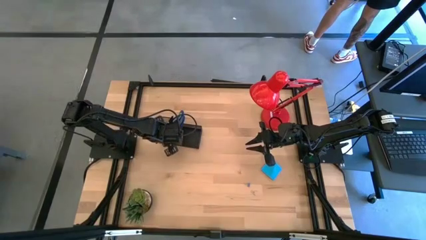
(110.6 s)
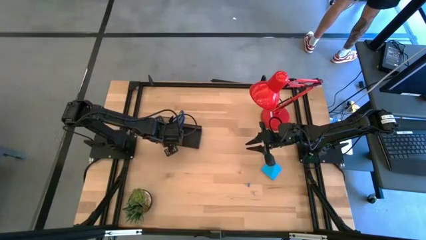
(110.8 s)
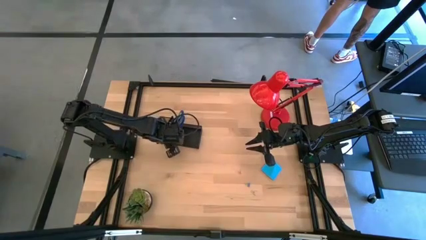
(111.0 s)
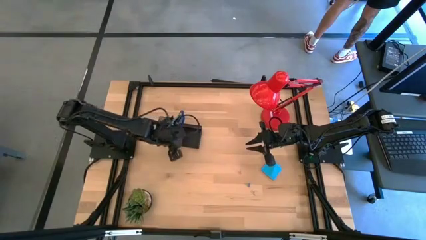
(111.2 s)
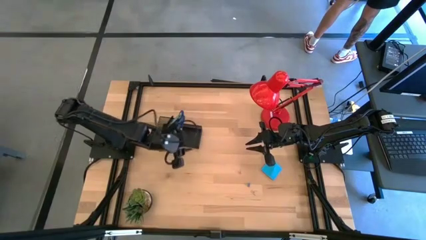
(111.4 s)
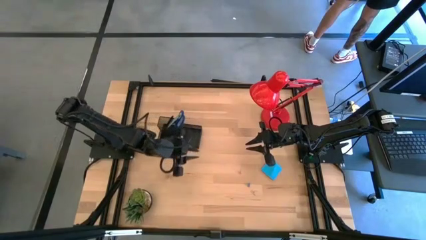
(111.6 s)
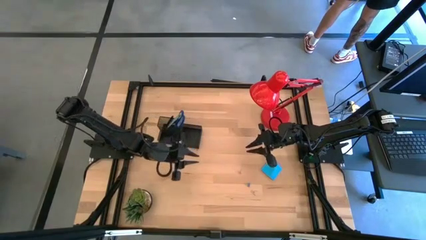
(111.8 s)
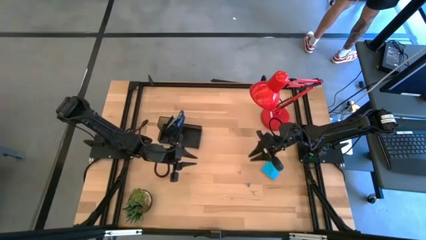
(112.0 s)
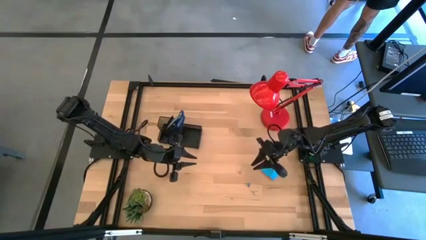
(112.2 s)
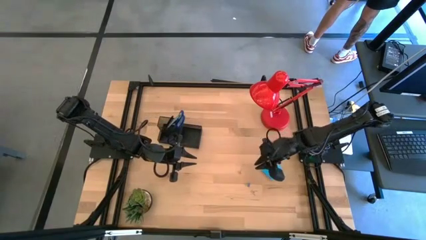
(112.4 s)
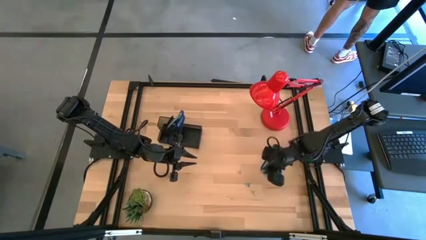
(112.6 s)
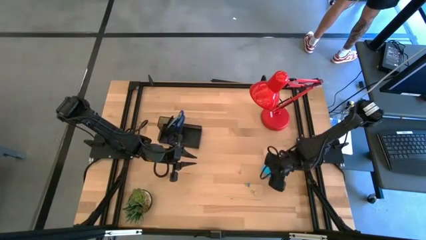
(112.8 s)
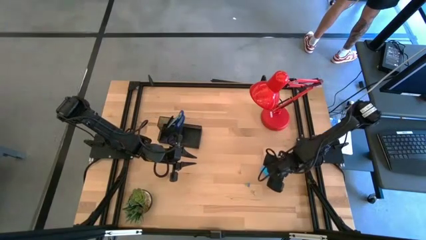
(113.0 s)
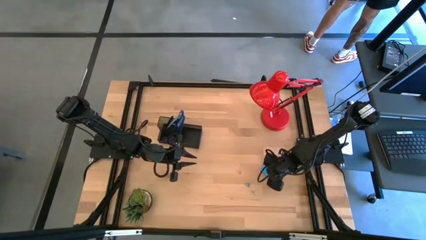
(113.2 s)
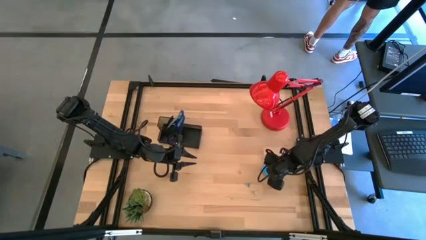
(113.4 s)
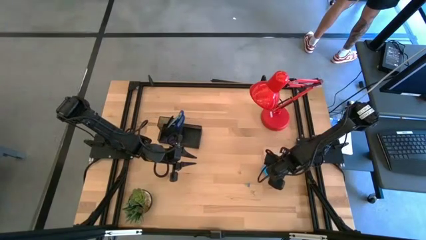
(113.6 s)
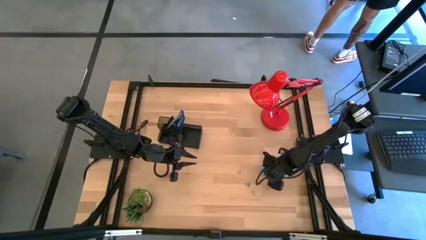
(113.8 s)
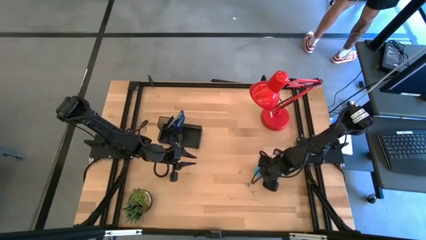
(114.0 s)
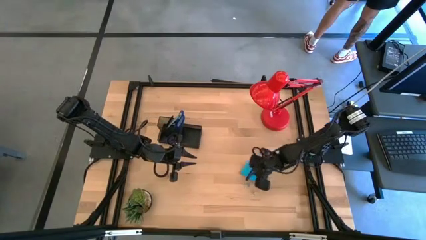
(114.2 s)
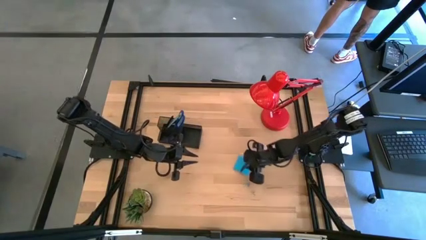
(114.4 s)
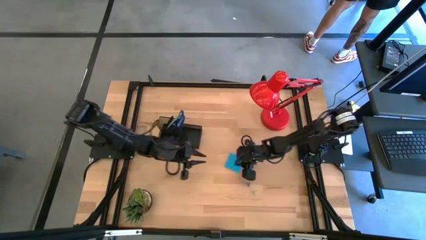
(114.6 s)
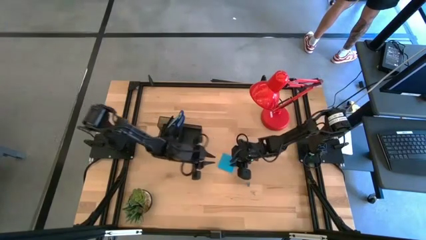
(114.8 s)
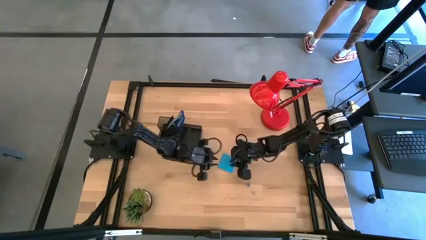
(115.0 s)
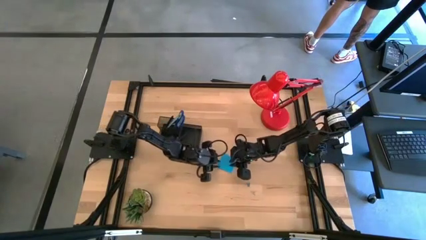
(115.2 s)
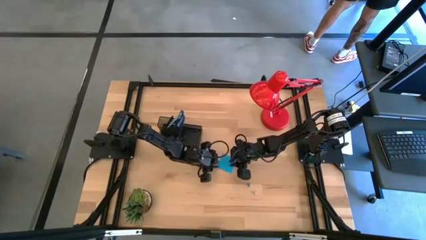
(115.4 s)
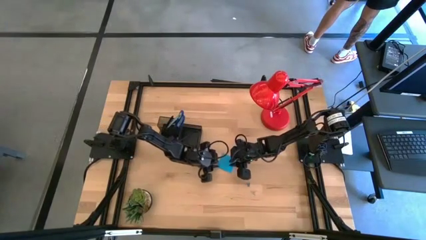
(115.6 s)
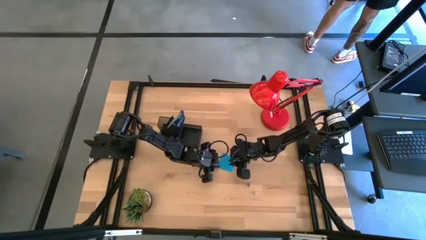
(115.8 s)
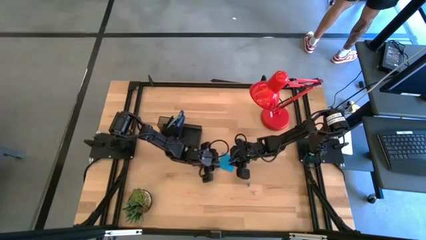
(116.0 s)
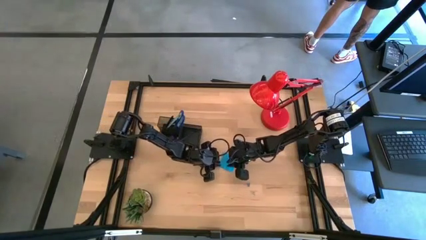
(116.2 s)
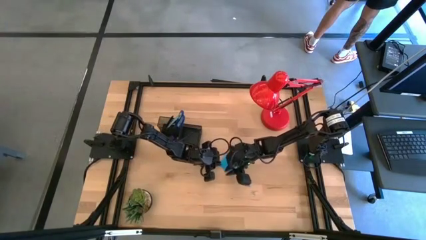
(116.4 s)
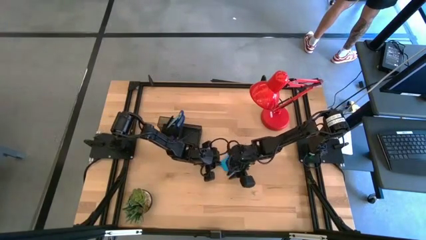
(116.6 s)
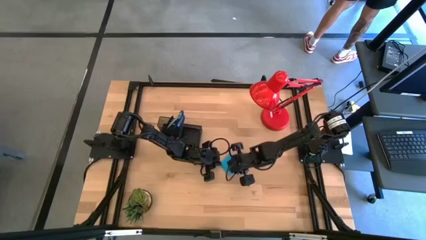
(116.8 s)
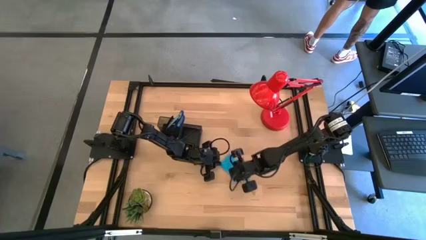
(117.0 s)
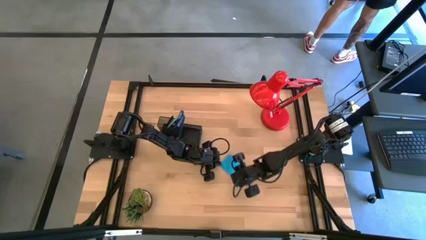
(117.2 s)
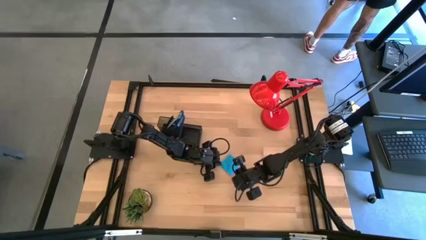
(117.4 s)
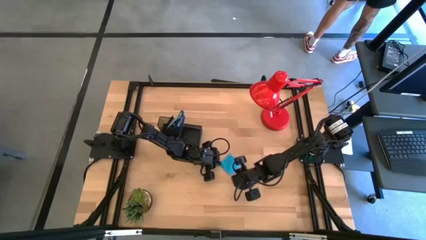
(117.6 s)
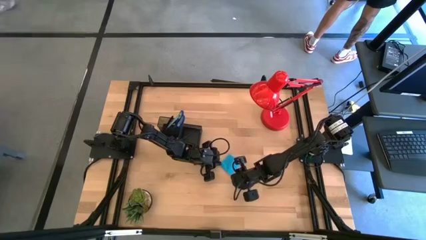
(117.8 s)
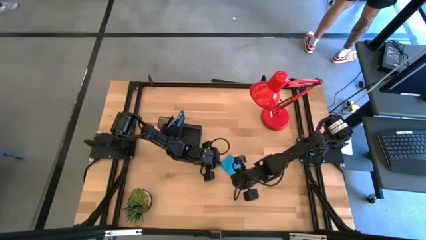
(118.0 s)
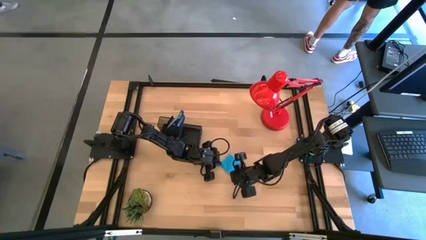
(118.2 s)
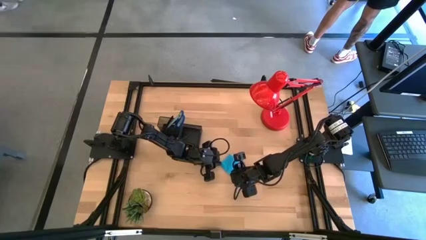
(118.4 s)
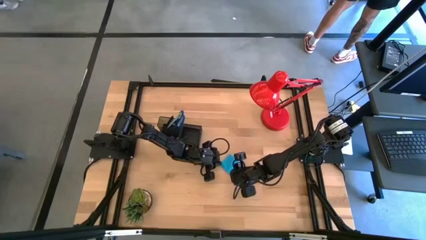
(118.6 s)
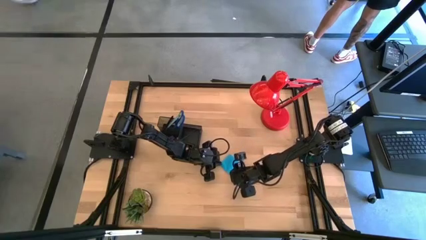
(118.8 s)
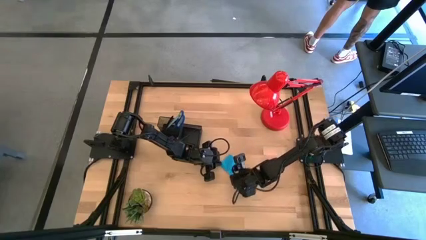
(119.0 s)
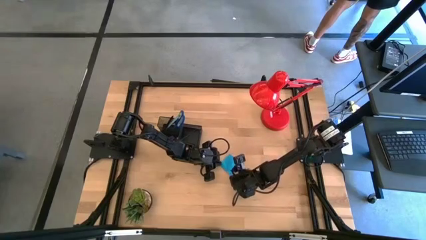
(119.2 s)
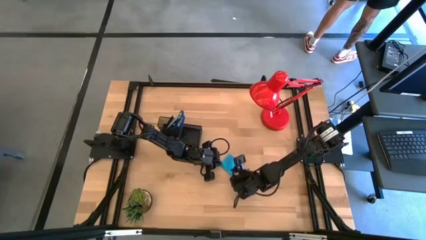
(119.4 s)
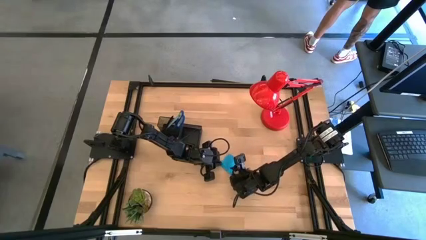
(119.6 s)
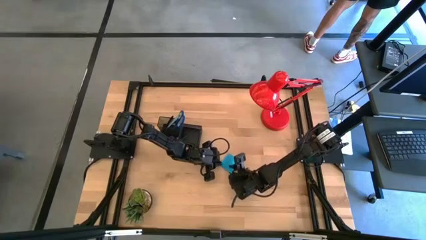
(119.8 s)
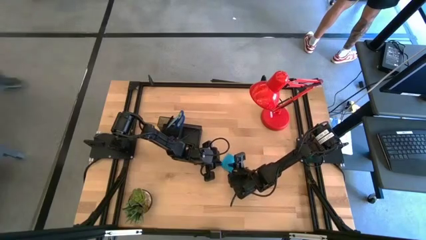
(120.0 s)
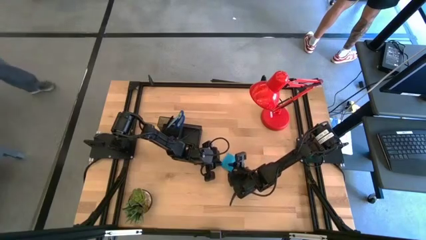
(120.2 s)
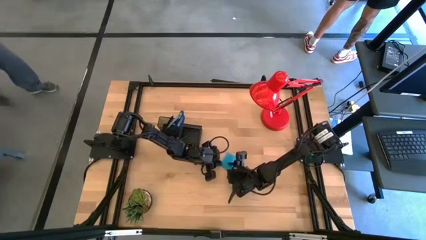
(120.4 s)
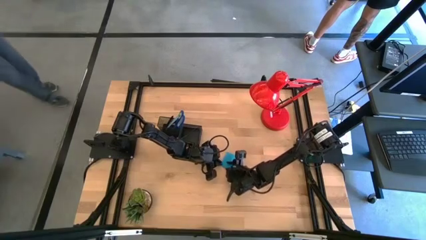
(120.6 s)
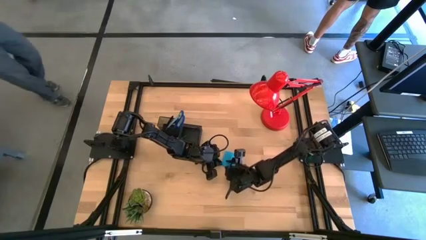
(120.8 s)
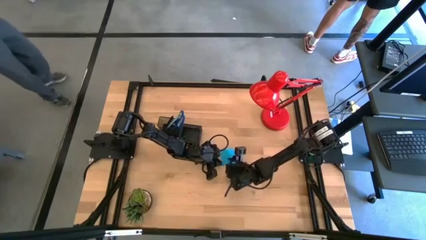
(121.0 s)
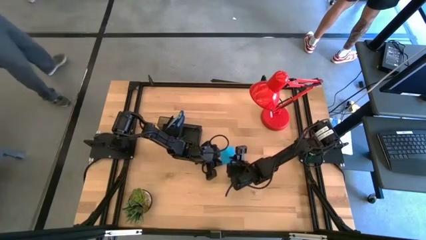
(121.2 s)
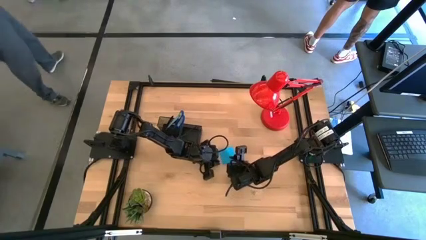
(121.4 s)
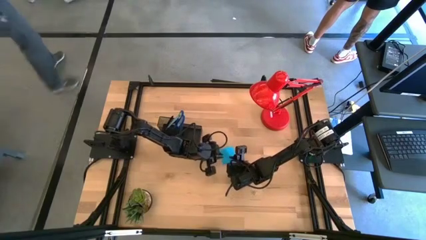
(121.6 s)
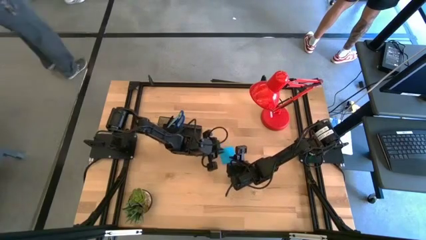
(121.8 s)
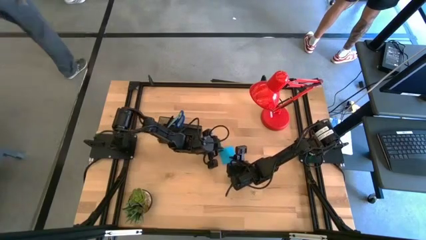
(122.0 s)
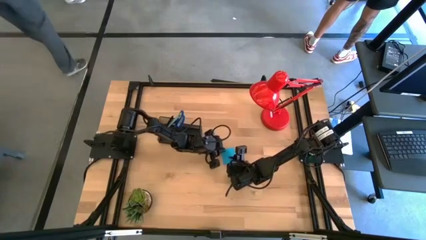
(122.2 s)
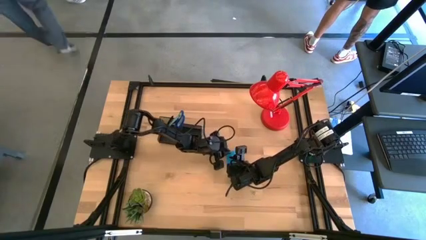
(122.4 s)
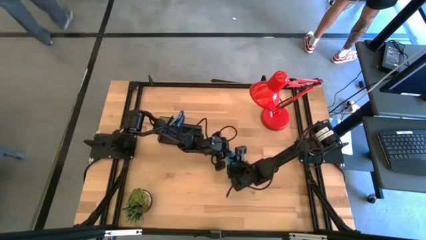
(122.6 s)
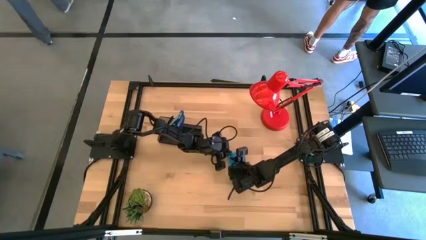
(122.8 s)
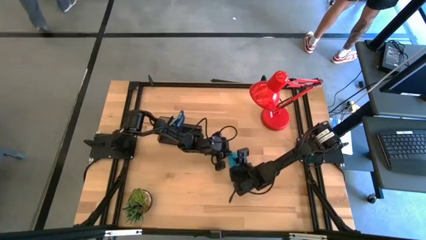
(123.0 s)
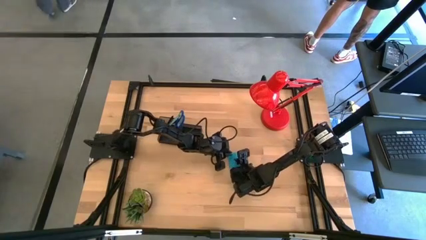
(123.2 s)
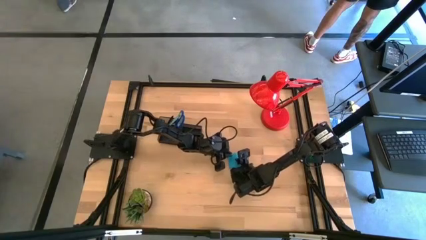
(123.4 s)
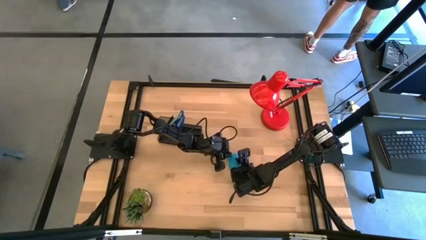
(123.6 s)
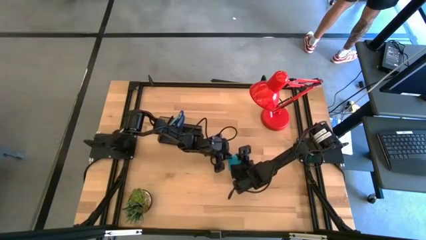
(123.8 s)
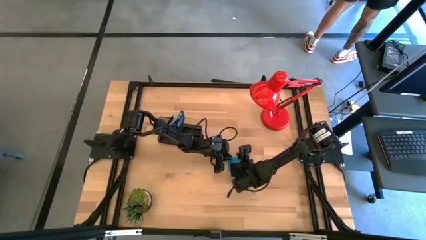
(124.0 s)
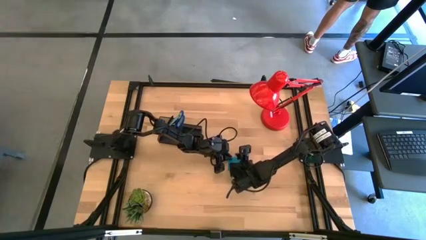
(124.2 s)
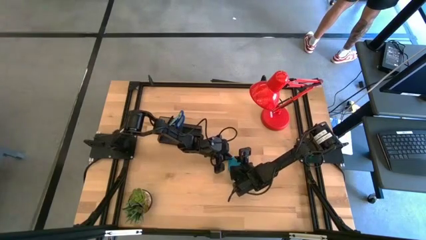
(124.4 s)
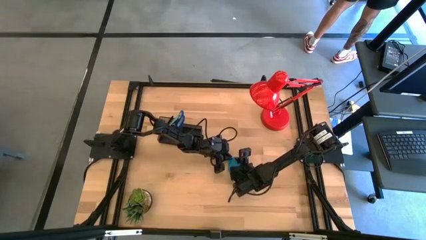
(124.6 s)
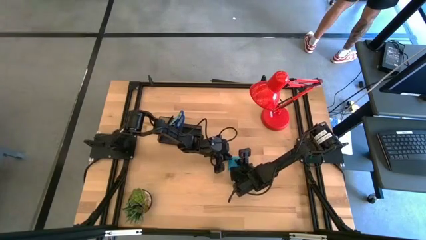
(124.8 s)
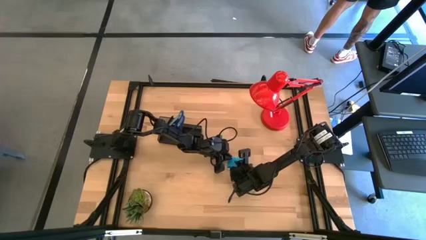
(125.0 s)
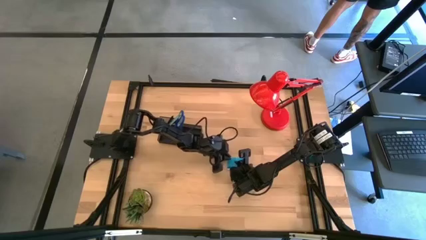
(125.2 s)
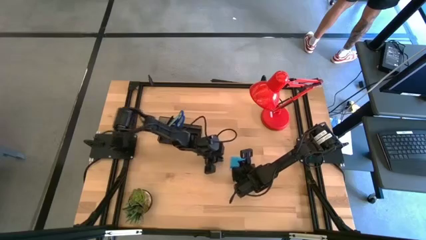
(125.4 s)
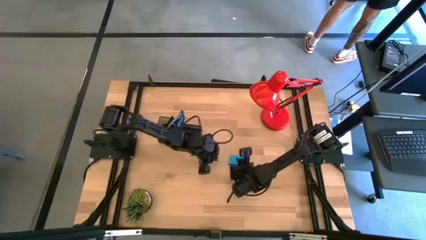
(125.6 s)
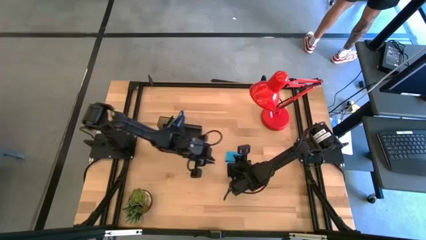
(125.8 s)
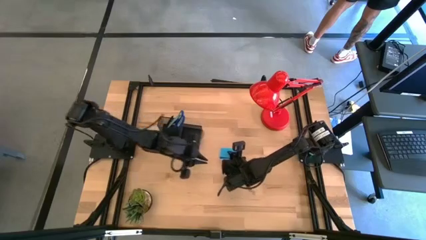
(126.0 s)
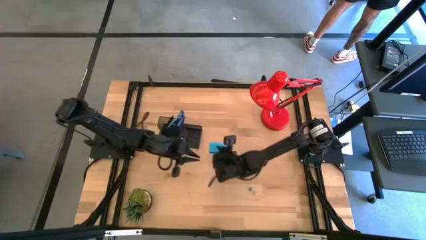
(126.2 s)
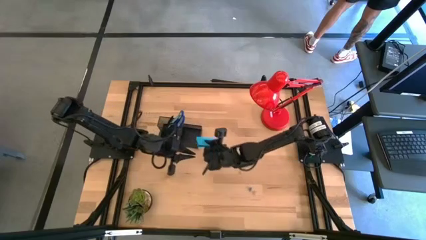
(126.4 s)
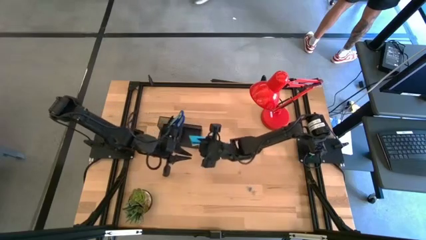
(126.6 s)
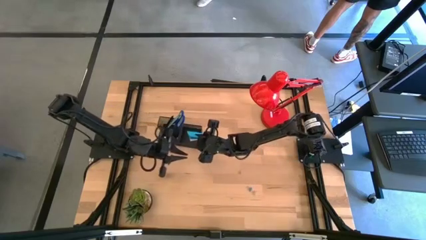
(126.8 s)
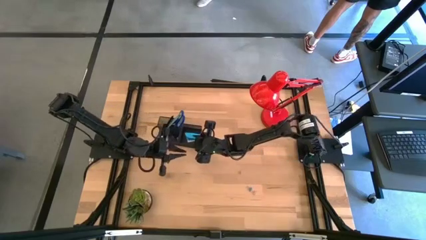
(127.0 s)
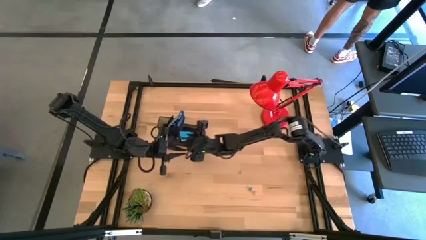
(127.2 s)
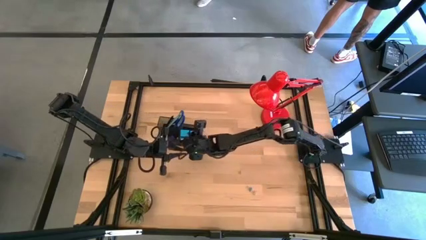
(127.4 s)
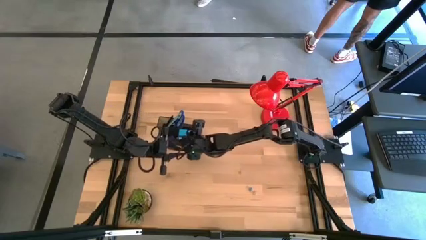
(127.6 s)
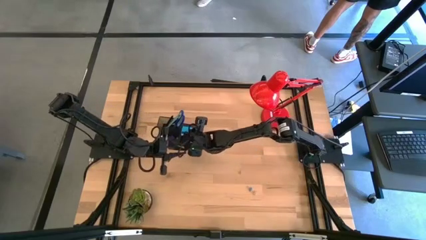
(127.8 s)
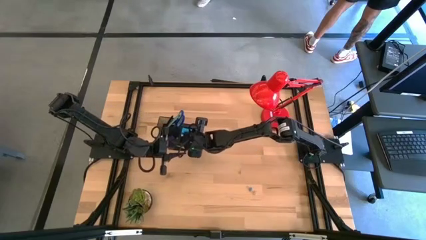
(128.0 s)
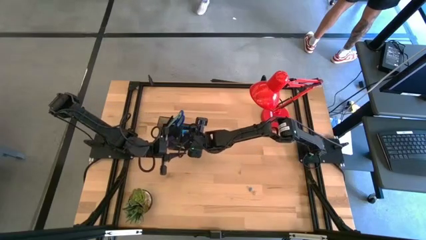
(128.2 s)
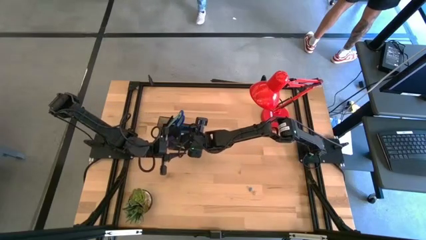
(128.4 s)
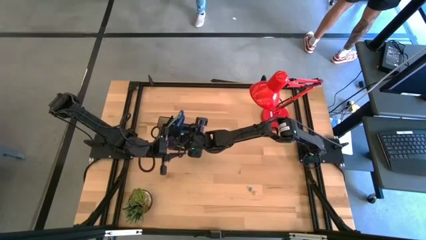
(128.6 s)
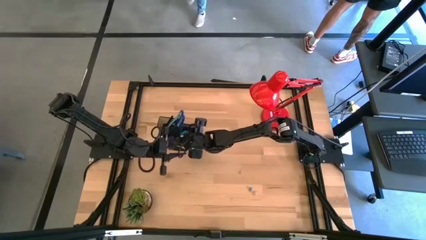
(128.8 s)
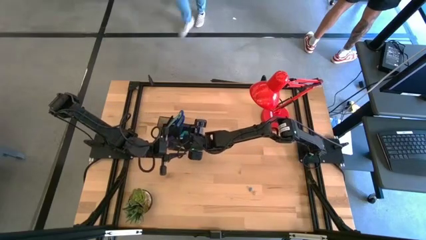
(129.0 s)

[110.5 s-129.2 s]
Task: Pick and place office supplies into organizer
Put the blue sticky notes into the black desk organizer
